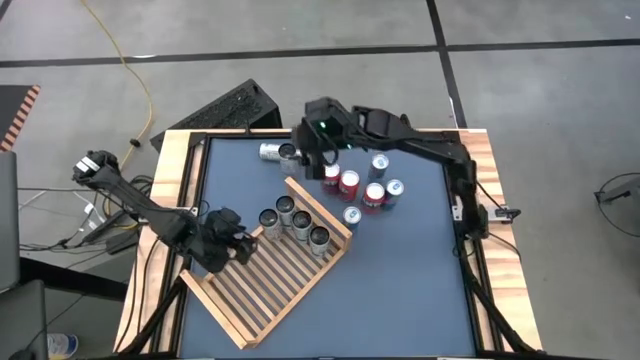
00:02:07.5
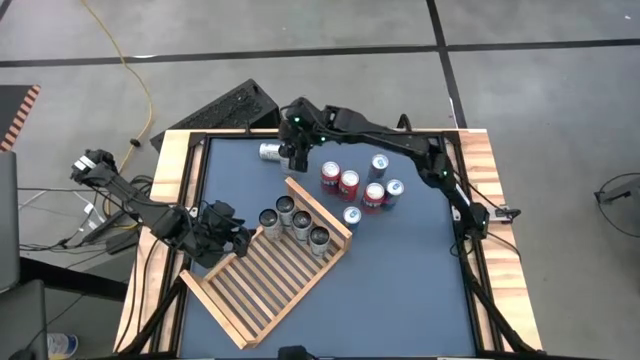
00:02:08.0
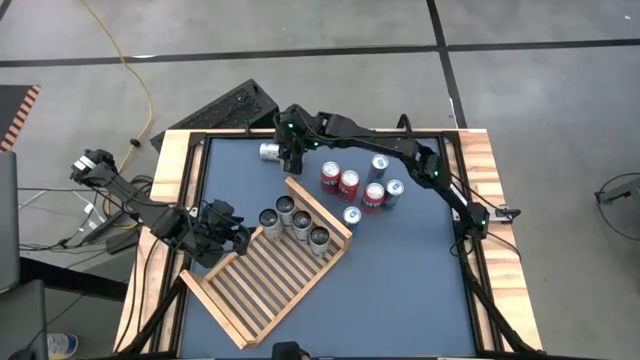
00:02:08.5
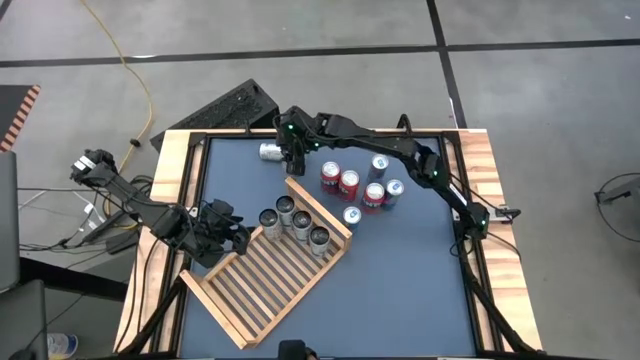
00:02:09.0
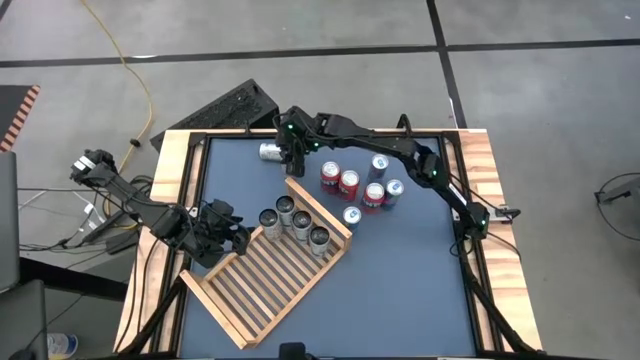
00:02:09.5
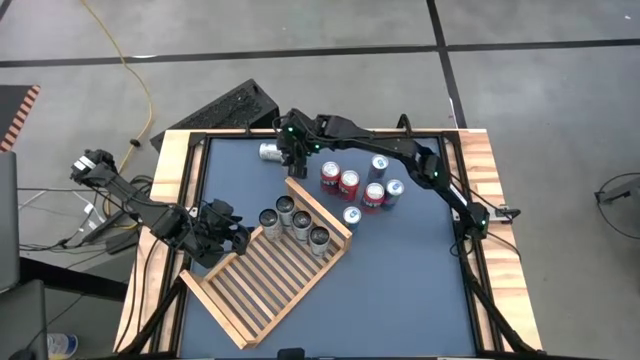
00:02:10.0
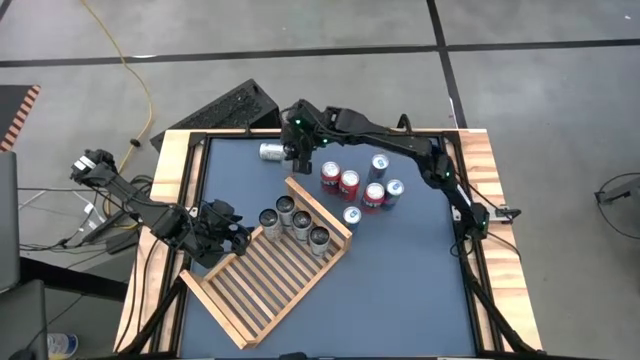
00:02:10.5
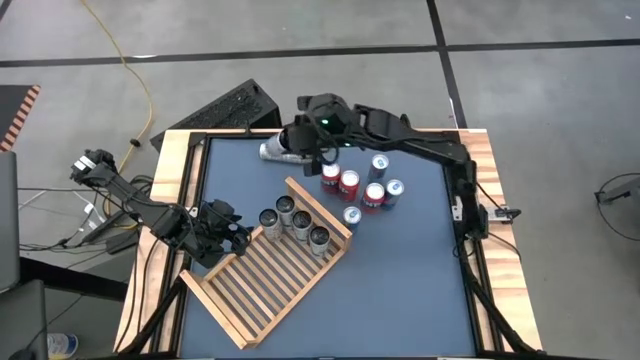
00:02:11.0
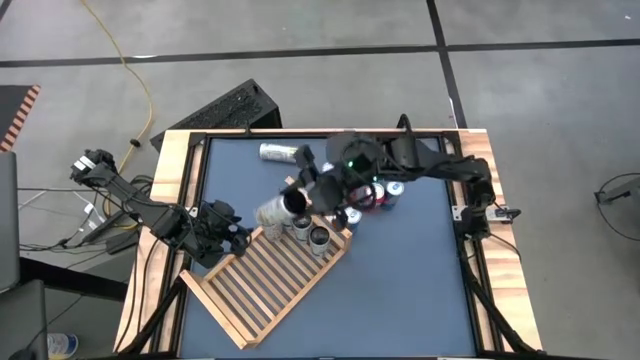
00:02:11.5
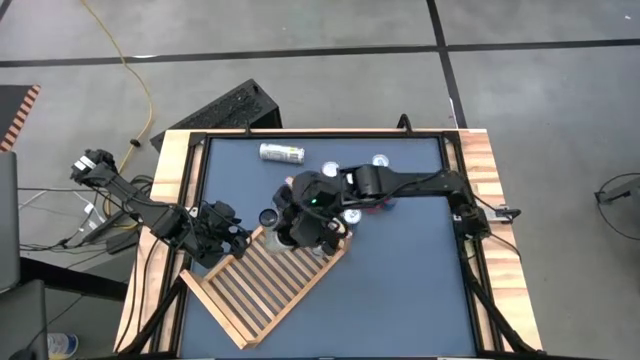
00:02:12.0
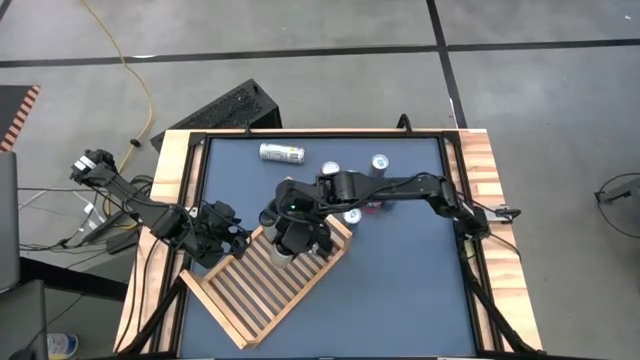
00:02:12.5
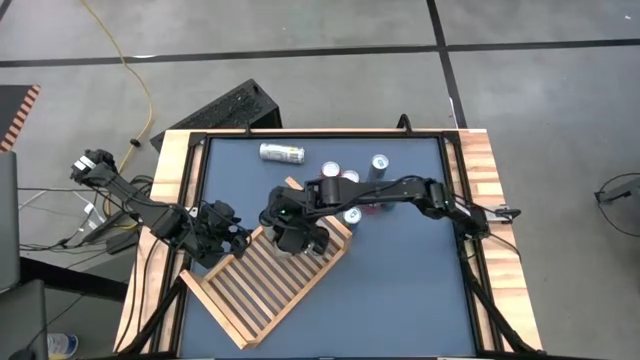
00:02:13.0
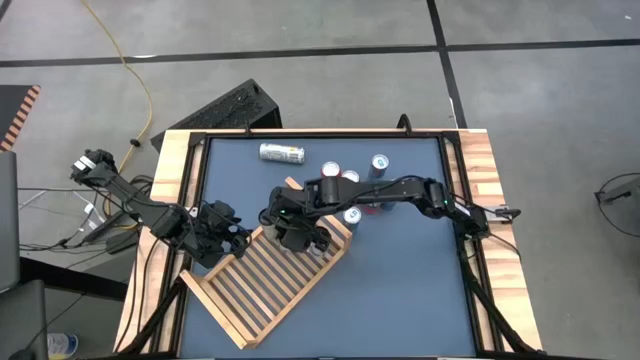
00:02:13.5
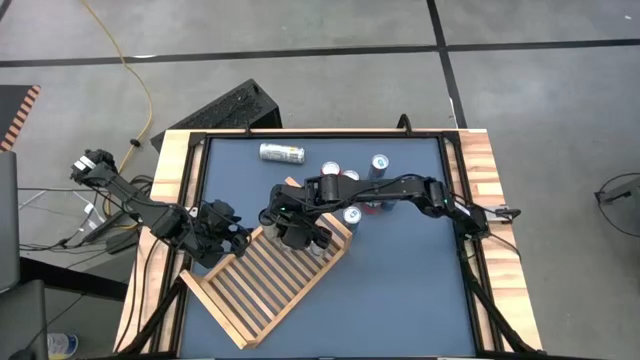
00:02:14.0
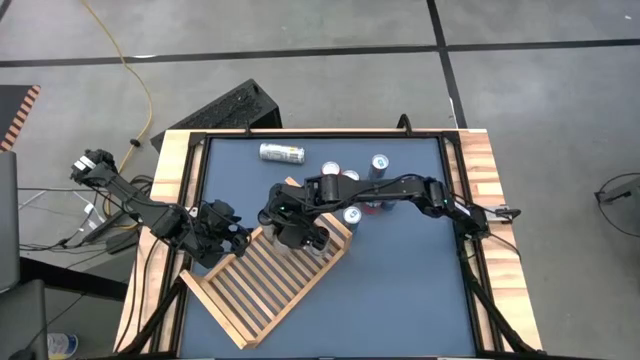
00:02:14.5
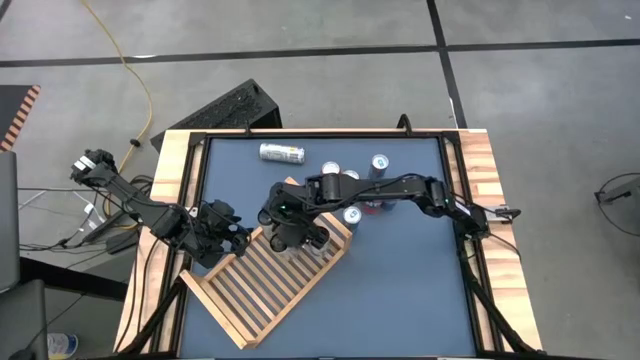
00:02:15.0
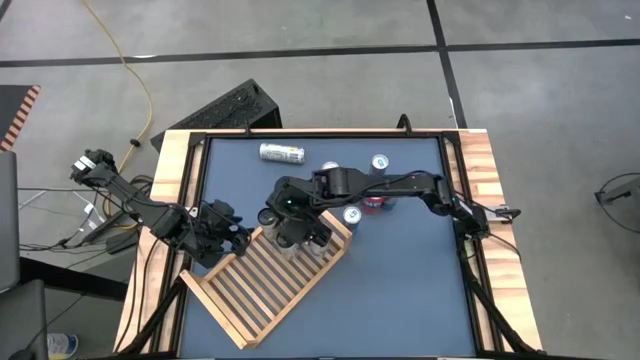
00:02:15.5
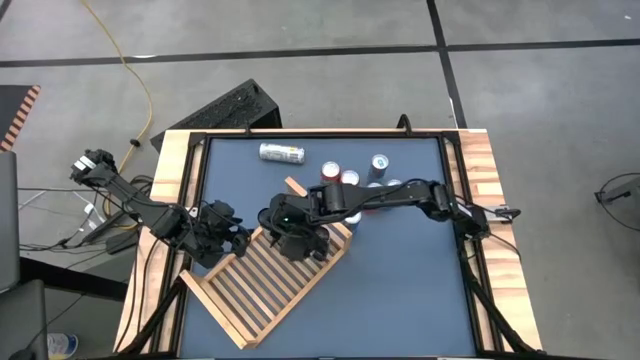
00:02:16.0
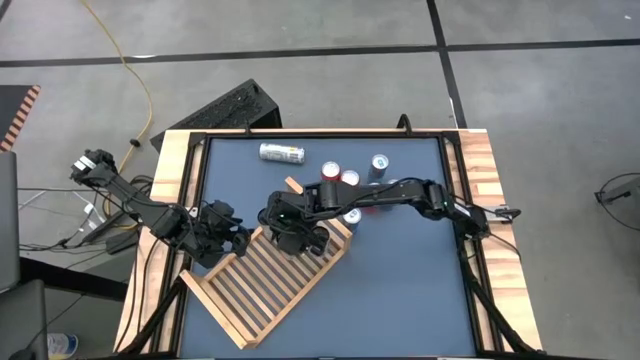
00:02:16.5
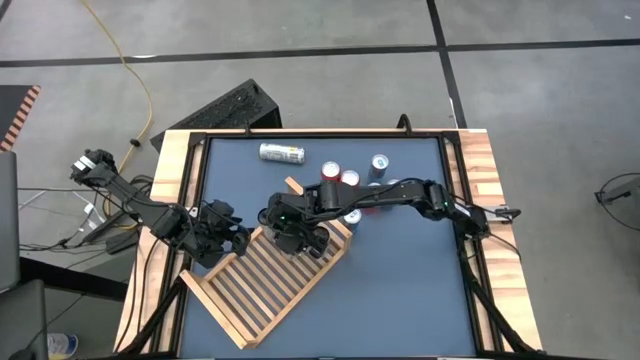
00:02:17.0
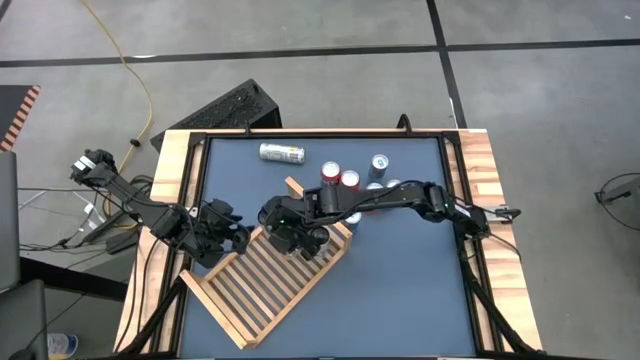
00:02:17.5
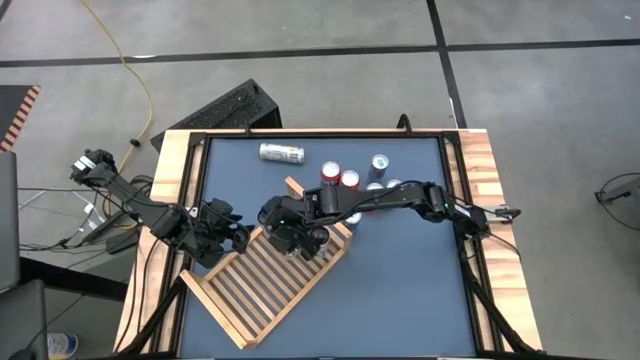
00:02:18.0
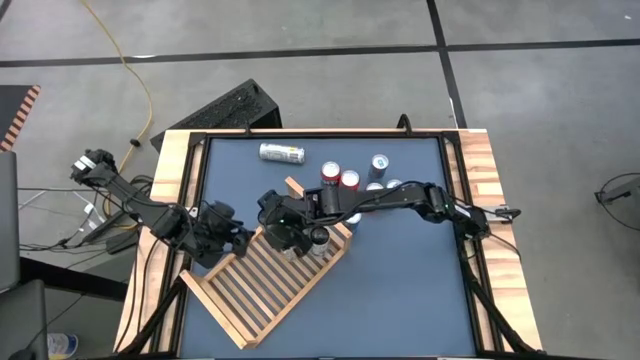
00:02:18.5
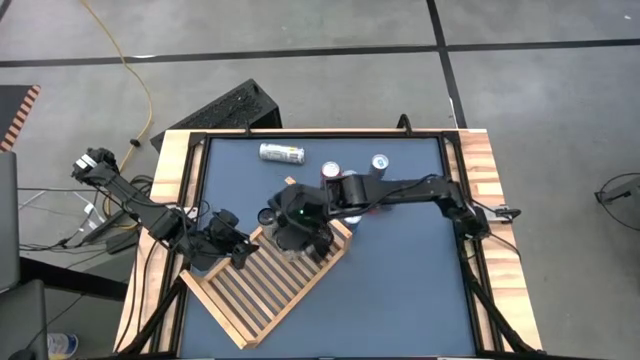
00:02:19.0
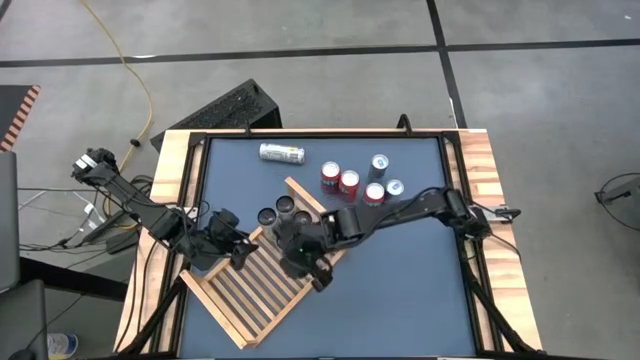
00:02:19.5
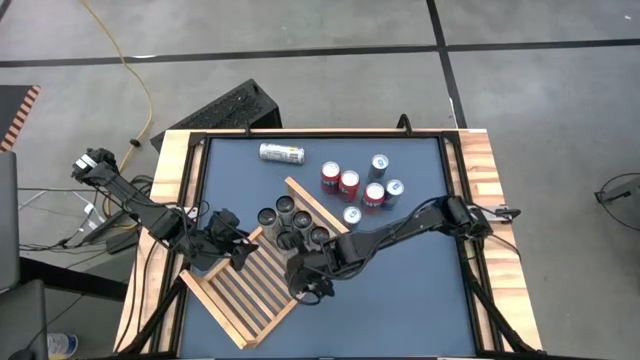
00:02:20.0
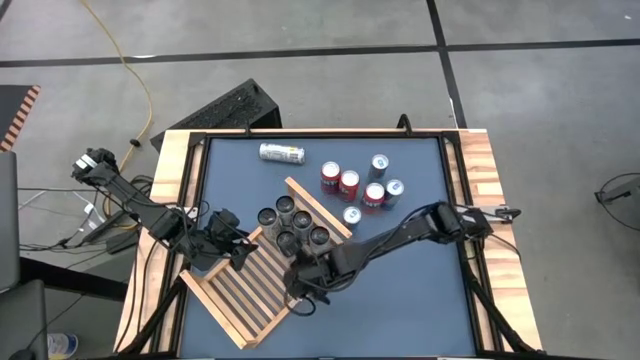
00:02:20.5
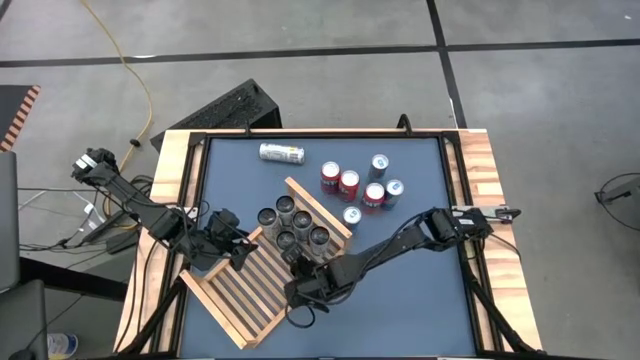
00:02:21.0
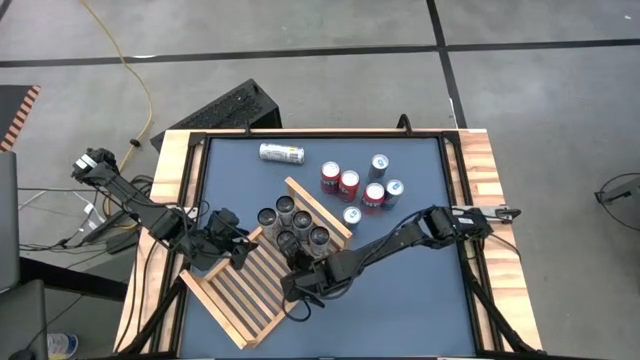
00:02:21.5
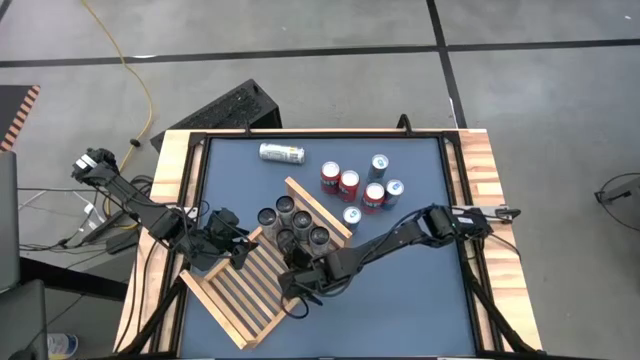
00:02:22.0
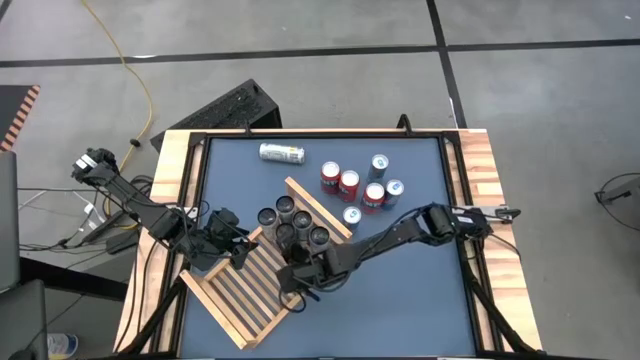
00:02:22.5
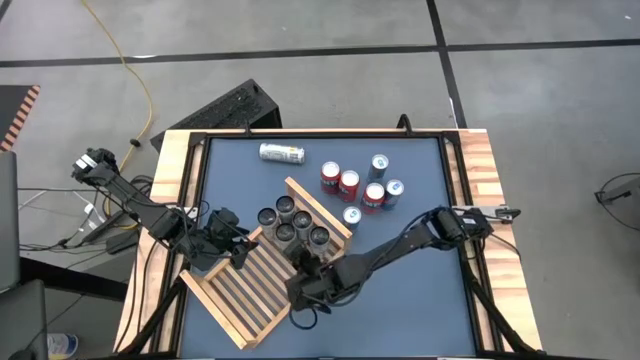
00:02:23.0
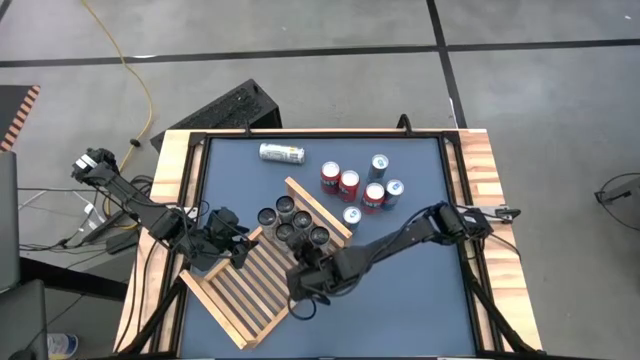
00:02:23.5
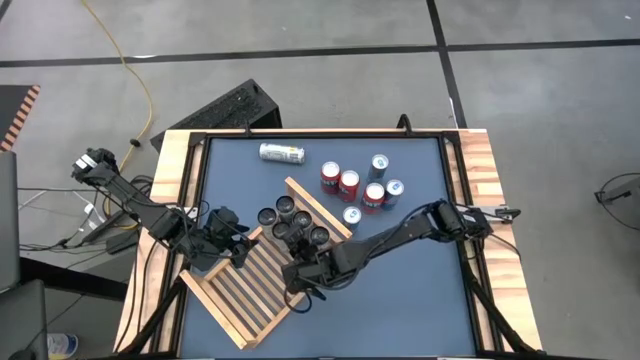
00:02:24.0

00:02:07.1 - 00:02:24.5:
Task: Place canned beverage on shelf
Put the bottom white yellow soda can on the shelf aligned with the other white yellow soda can

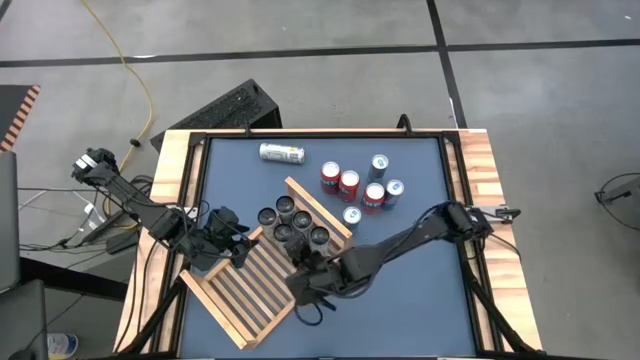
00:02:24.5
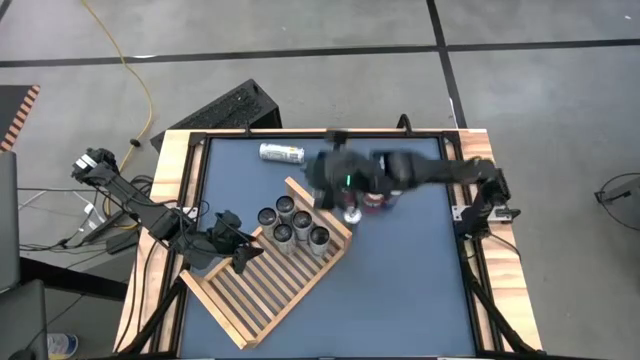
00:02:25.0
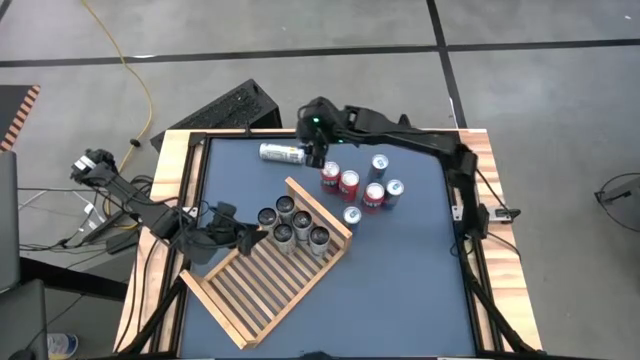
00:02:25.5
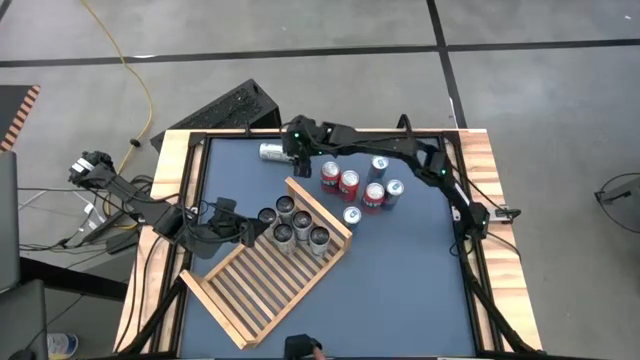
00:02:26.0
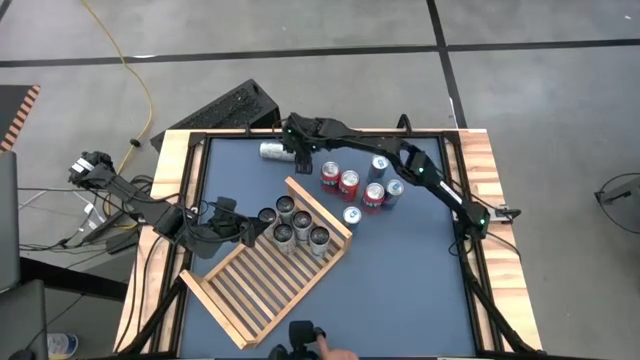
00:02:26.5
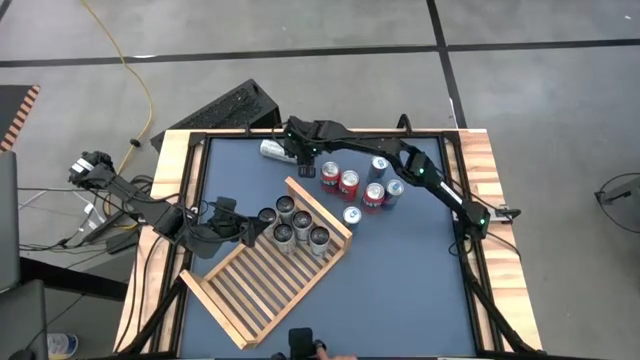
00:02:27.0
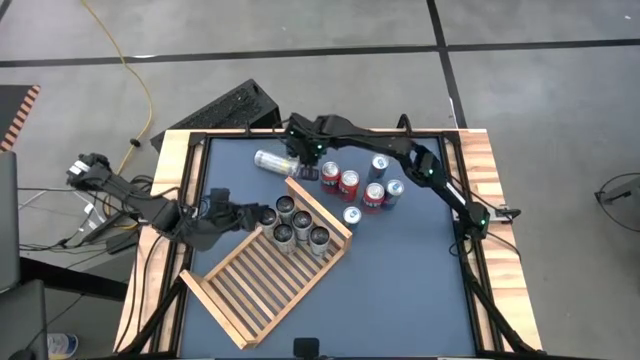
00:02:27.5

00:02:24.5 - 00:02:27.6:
Put the white yellow soda can on the shelf aligned with the other white yellow soda cans
